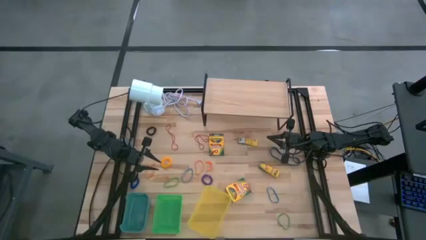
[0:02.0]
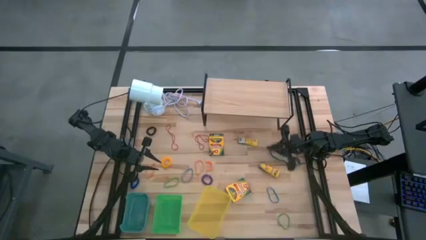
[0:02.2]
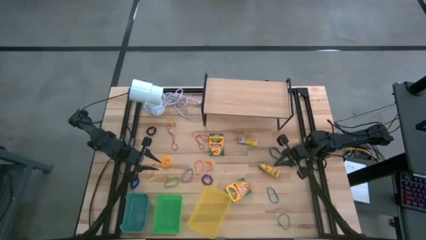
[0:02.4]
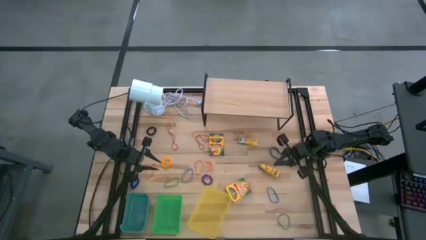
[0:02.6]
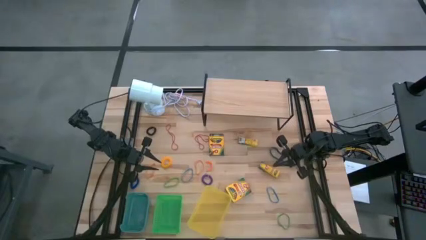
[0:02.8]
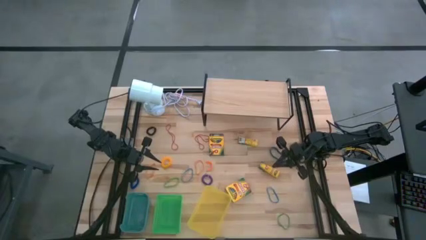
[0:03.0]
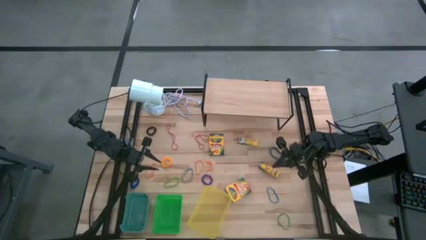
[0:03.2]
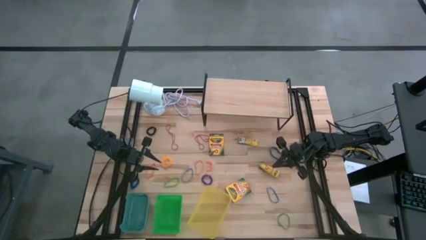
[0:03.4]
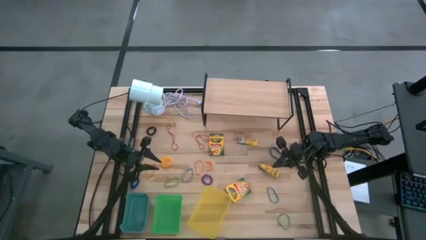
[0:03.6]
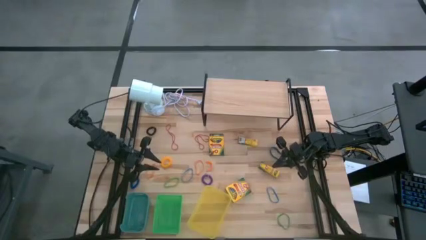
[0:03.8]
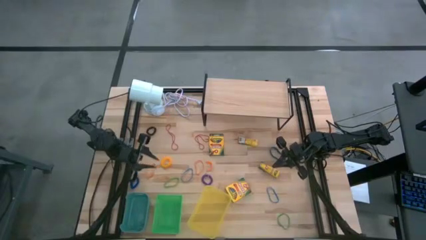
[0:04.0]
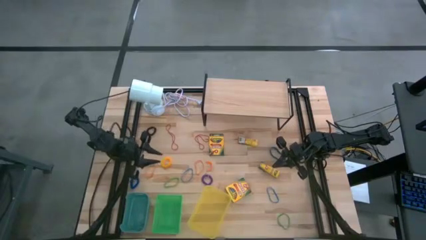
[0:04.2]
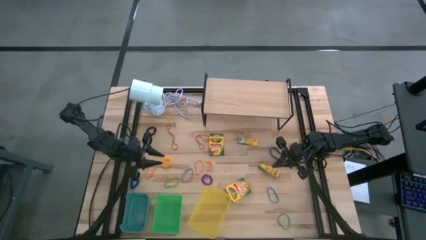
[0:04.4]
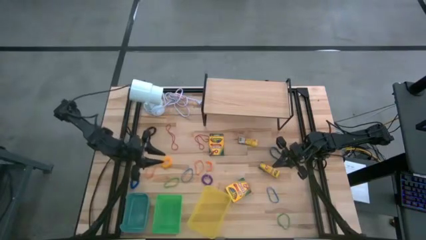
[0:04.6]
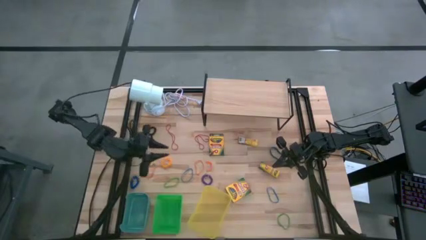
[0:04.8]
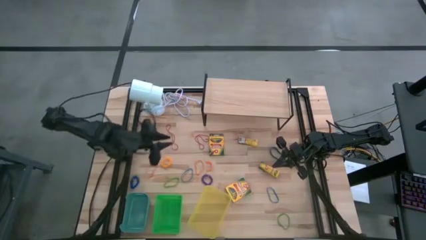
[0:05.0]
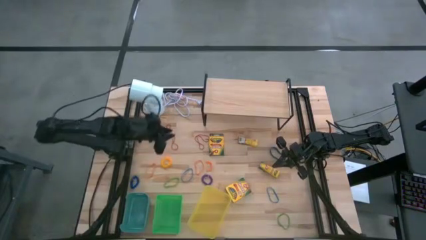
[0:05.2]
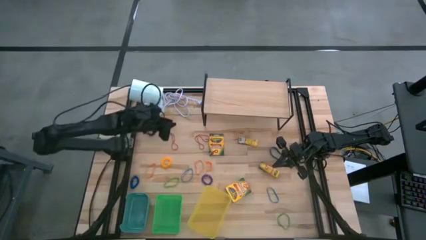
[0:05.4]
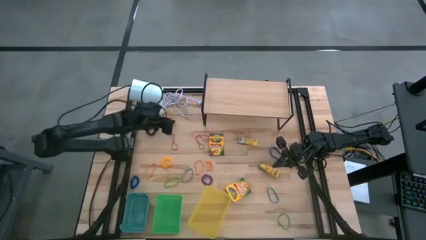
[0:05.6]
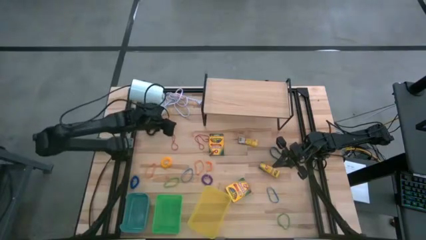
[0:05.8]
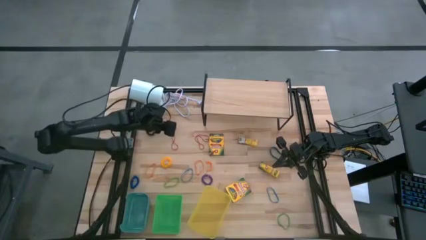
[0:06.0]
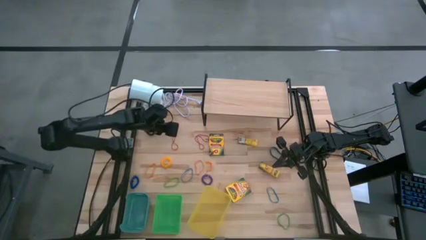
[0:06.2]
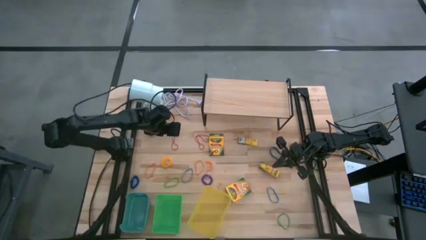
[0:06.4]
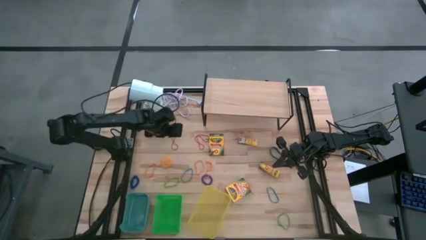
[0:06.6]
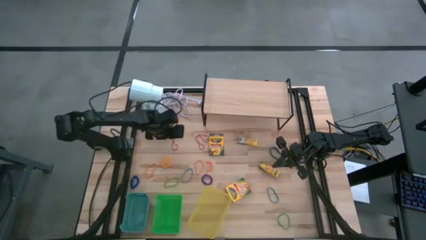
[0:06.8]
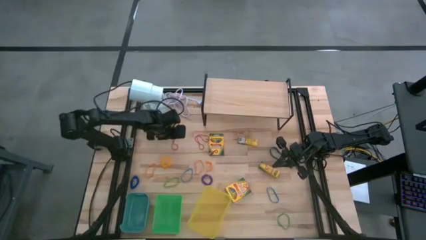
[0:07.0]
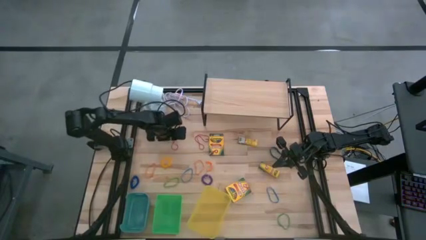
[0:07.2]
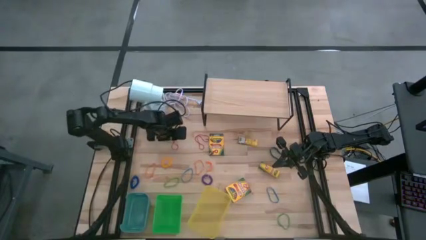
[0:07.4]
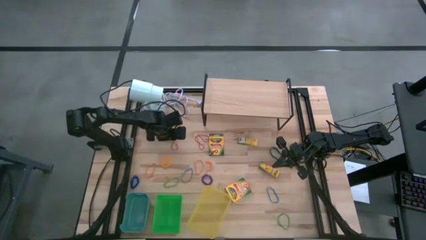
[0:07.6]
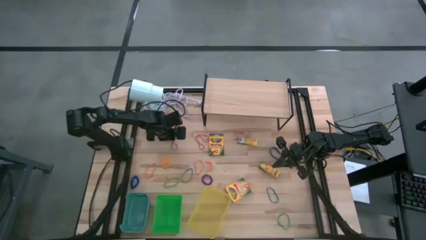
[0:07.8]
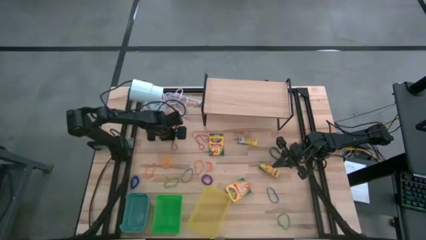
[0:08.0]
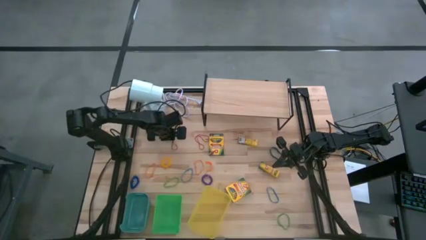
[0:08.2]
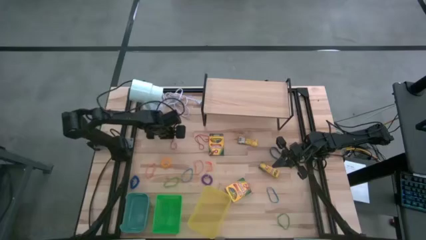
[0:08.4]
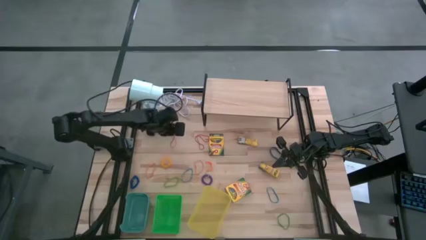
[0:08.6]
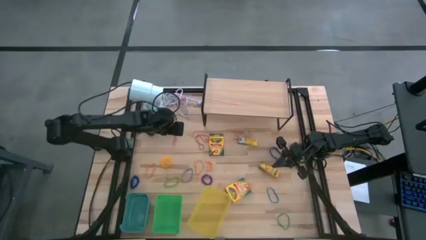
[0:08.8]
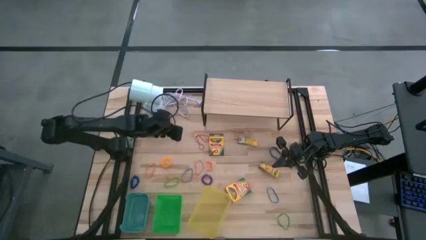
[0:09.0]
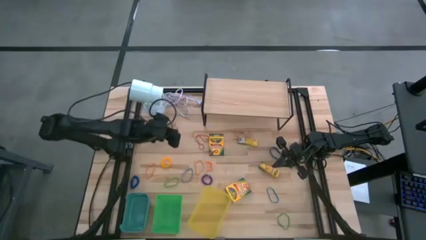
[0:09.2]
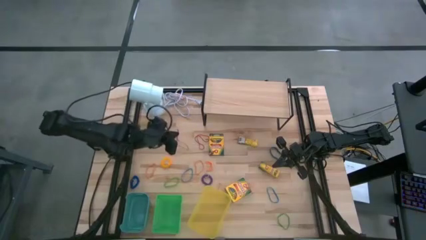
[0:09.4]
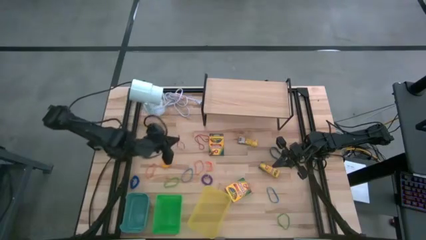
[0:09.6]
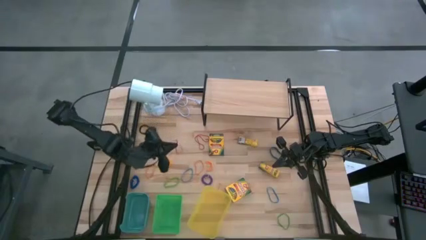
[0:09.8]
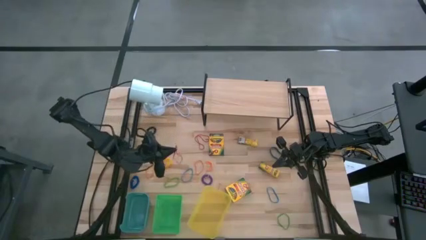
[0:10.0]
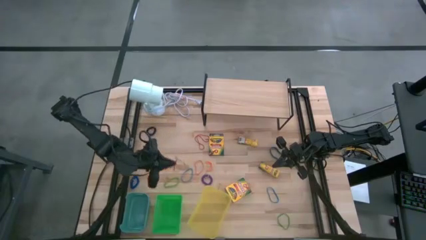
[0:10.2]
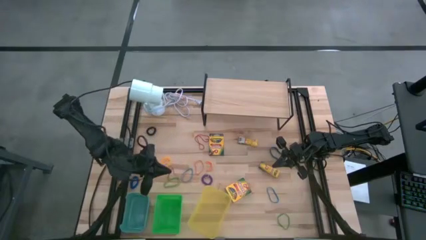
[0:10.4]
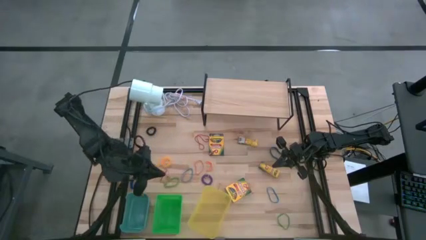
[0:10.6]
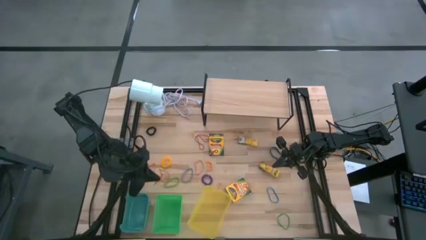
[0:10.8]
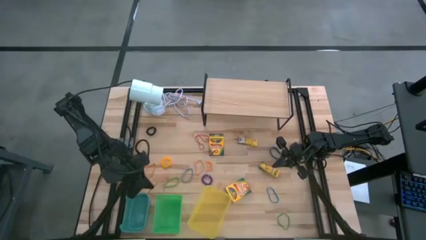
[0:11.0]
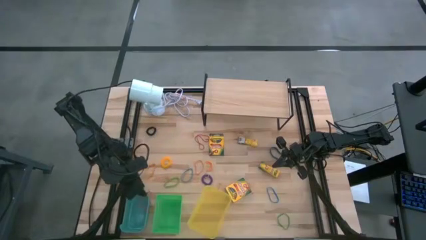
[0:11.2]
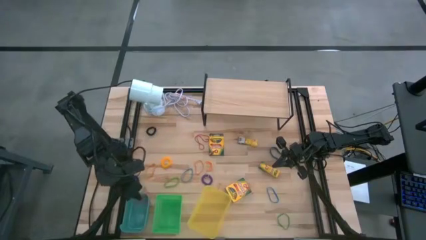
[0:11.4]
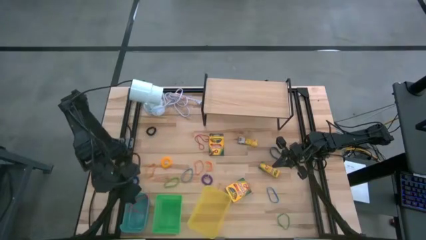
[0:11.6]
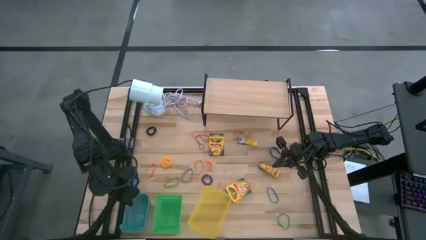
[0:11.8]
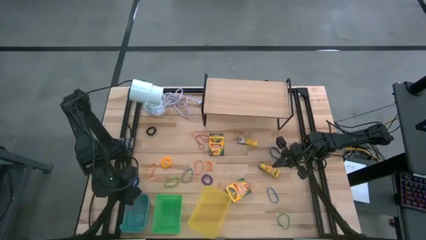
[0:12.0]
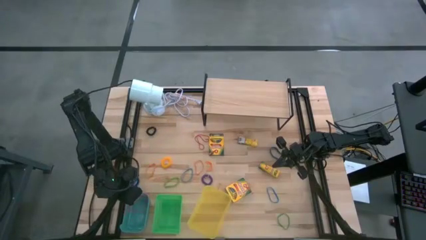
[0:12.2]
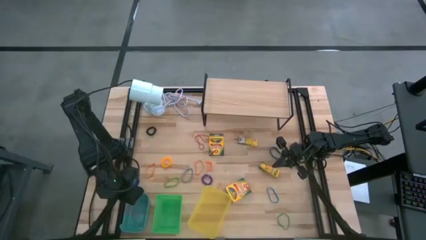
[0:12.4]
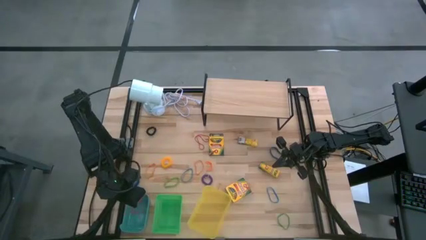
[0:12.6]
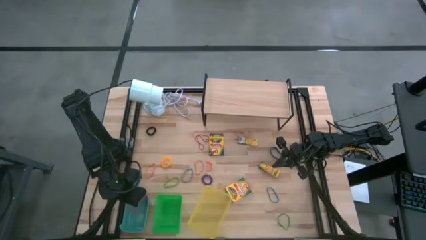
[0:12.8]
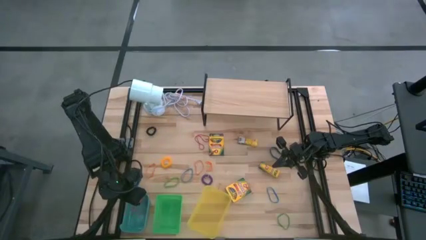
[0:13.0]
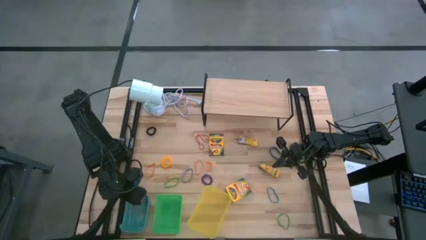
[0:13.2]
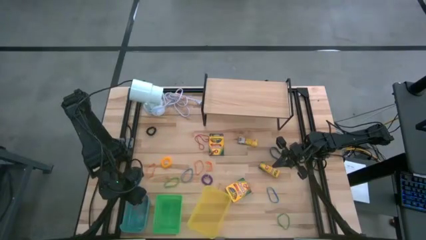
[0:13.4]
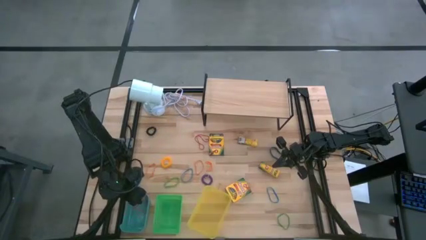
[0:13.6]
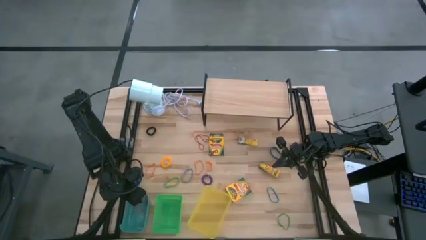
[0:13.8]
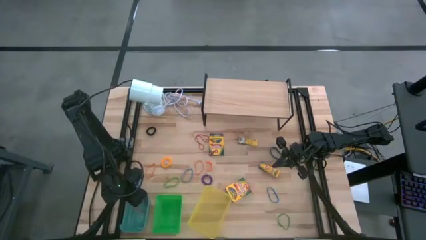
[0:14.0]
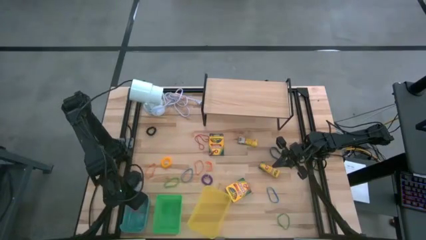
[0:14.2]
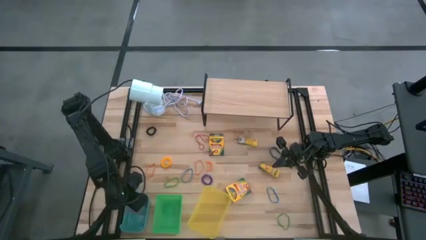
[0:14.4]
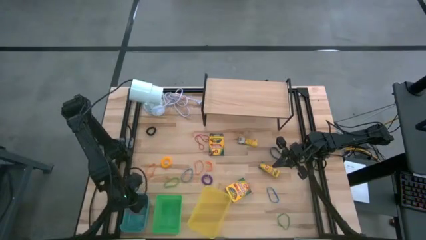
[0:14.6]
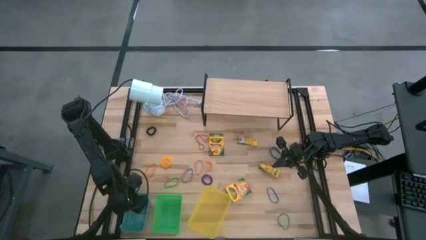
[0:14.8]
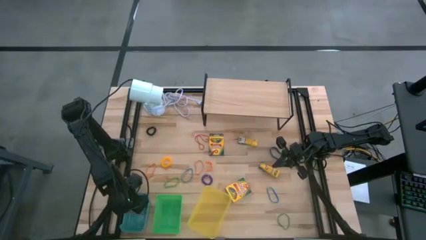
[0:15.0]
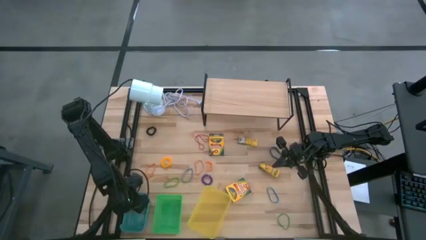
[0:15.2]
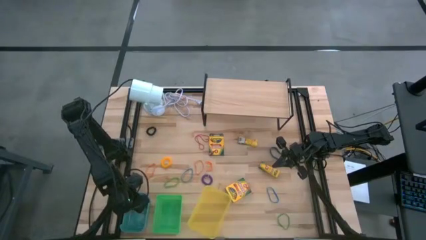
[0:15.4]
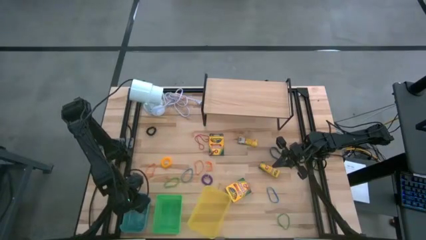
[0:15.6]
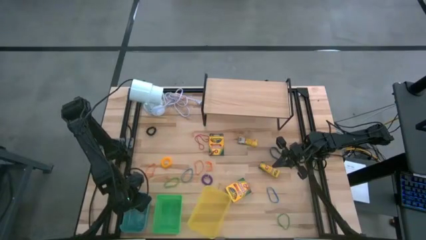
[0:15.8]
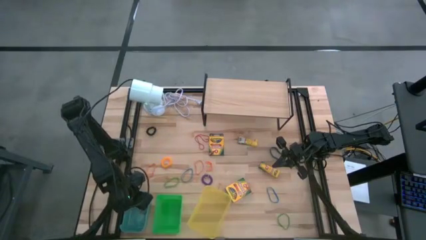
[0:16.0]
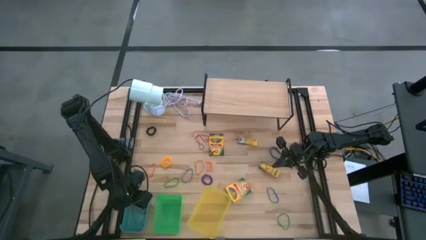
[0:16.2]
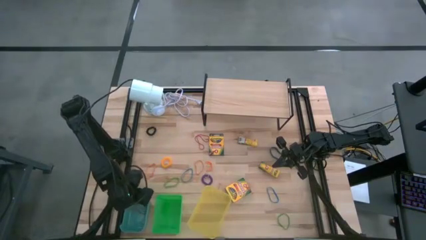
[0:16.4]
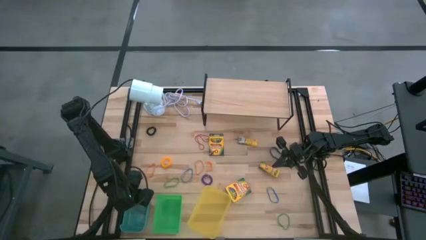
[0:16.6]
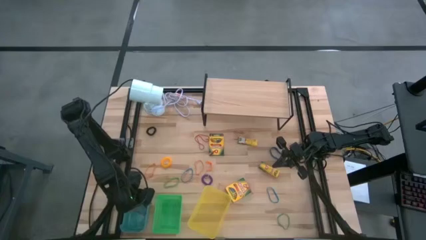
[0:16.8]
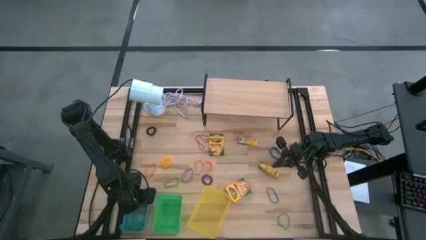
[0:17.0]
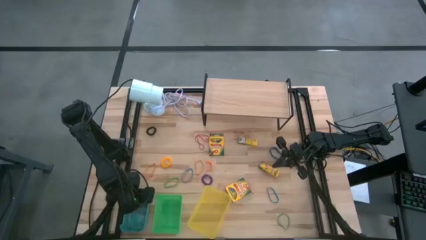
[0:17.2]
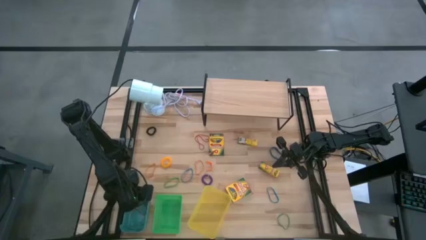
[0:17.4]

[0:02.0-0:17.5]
Task: Pick & Place Office Desk Supplies
Put the red rubberband into the blue bin
